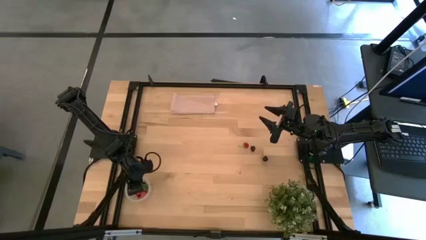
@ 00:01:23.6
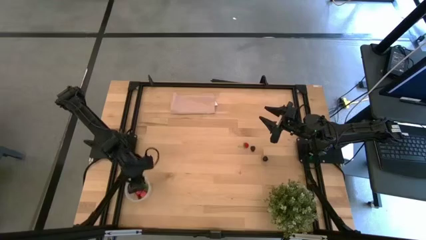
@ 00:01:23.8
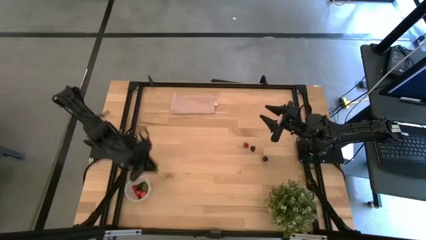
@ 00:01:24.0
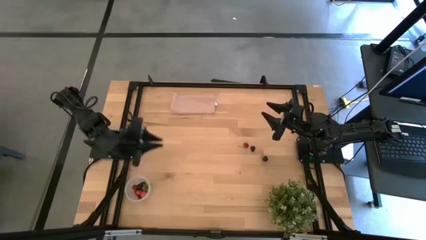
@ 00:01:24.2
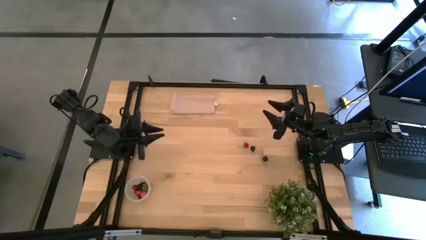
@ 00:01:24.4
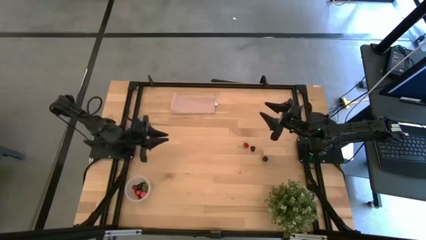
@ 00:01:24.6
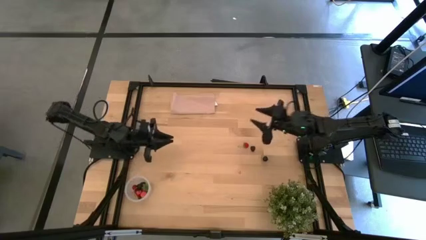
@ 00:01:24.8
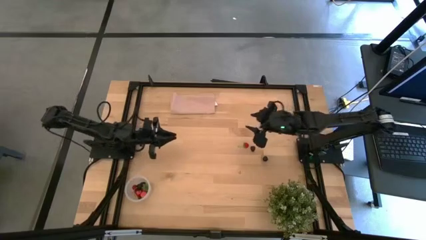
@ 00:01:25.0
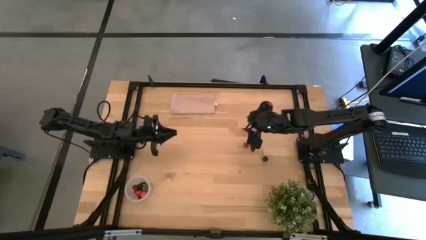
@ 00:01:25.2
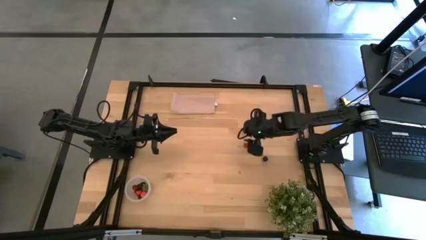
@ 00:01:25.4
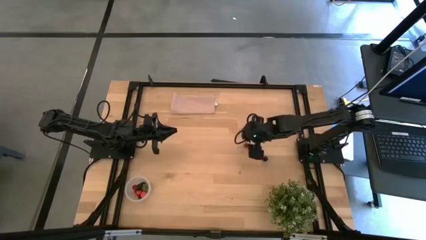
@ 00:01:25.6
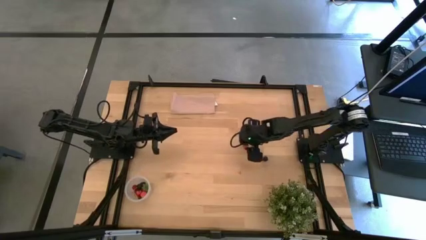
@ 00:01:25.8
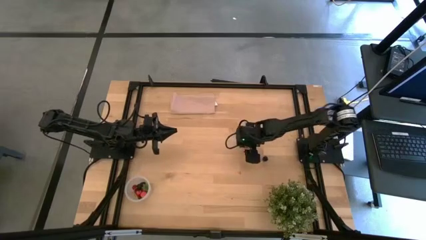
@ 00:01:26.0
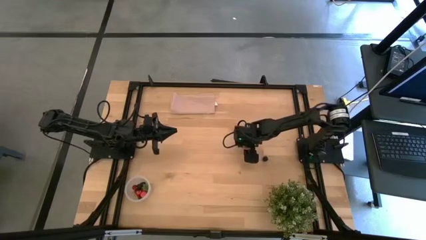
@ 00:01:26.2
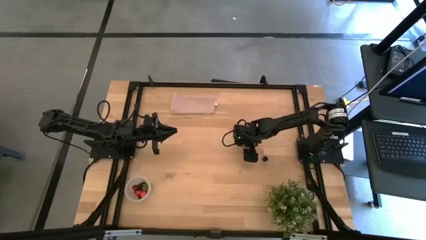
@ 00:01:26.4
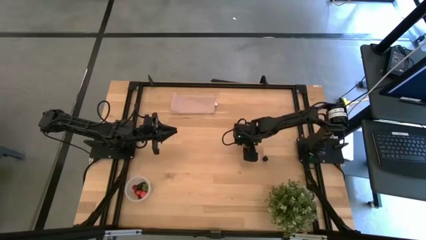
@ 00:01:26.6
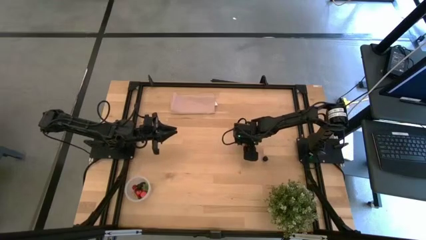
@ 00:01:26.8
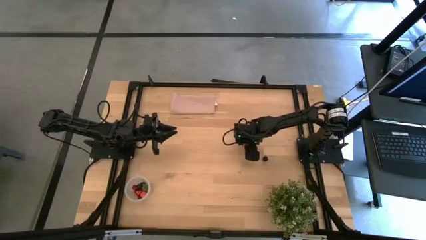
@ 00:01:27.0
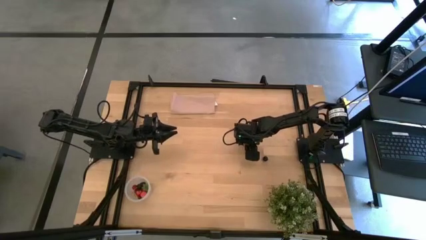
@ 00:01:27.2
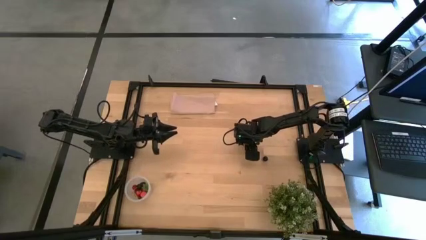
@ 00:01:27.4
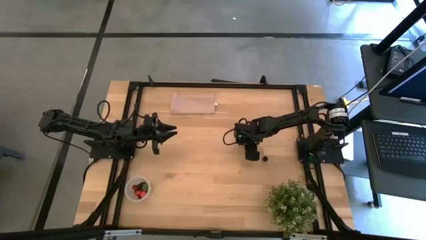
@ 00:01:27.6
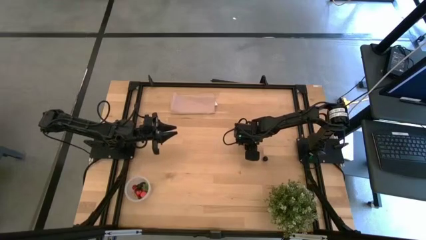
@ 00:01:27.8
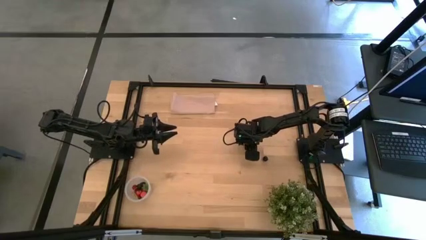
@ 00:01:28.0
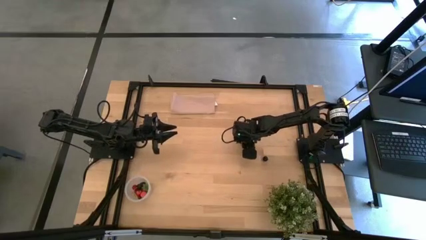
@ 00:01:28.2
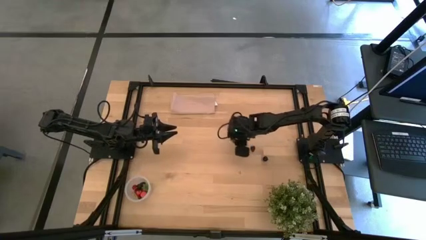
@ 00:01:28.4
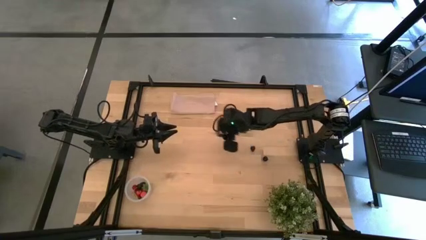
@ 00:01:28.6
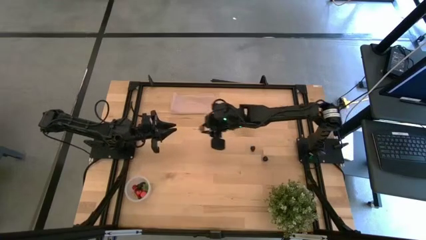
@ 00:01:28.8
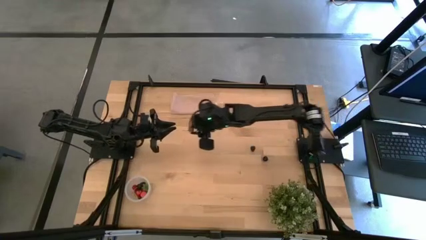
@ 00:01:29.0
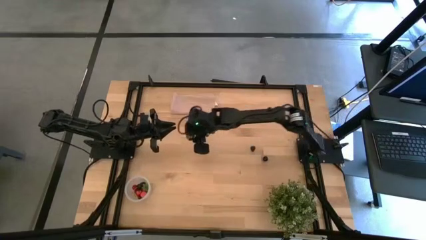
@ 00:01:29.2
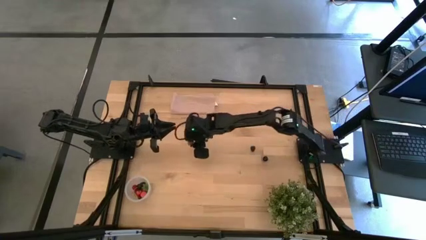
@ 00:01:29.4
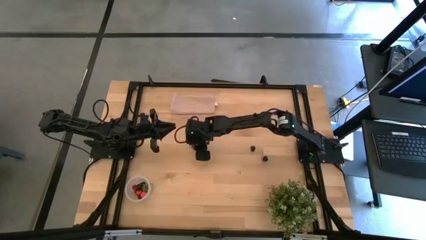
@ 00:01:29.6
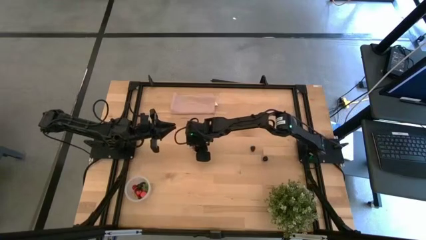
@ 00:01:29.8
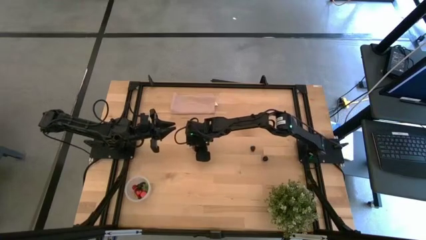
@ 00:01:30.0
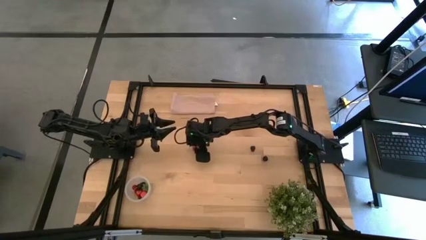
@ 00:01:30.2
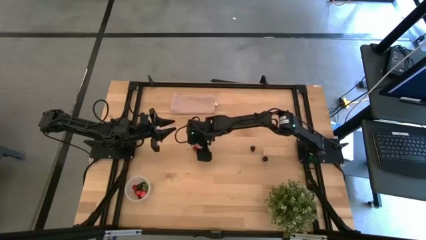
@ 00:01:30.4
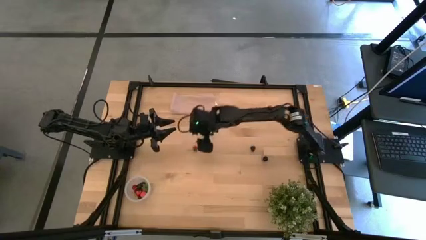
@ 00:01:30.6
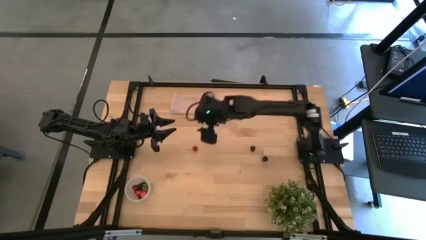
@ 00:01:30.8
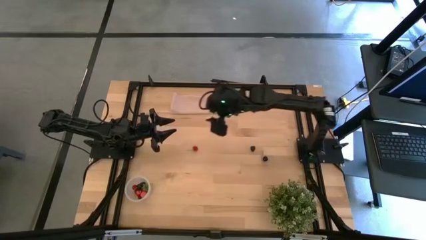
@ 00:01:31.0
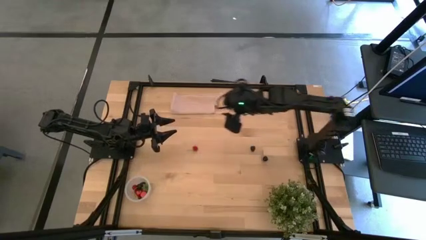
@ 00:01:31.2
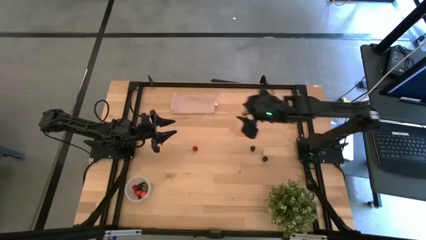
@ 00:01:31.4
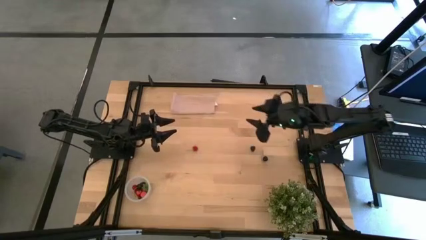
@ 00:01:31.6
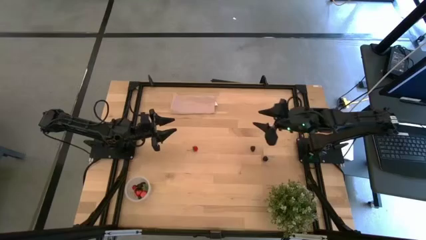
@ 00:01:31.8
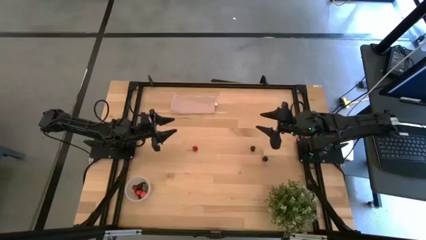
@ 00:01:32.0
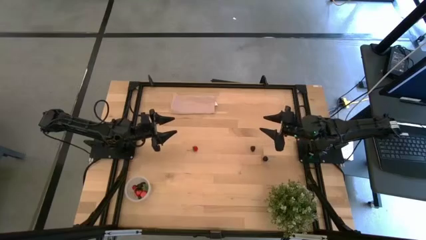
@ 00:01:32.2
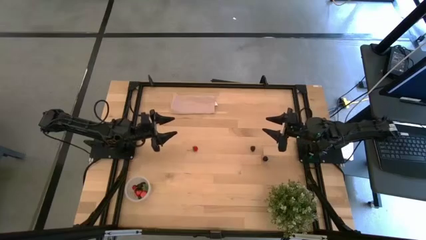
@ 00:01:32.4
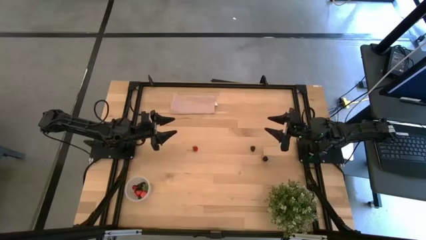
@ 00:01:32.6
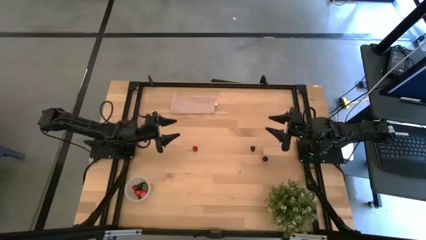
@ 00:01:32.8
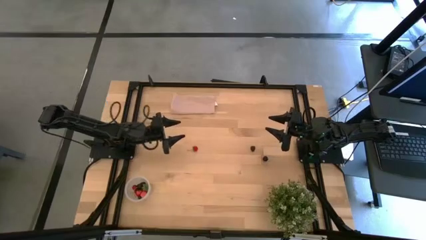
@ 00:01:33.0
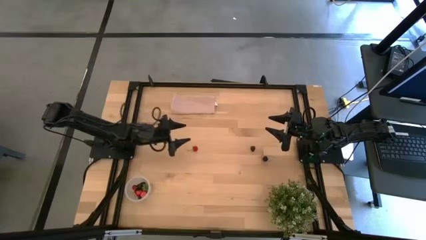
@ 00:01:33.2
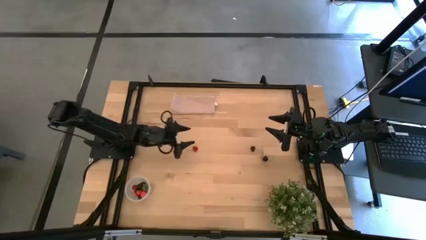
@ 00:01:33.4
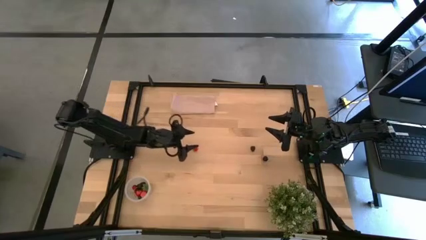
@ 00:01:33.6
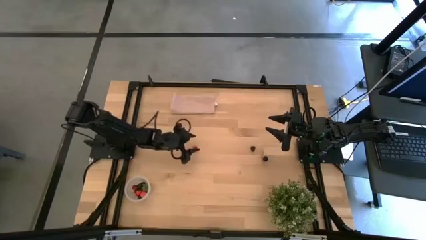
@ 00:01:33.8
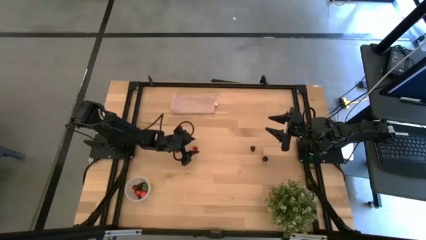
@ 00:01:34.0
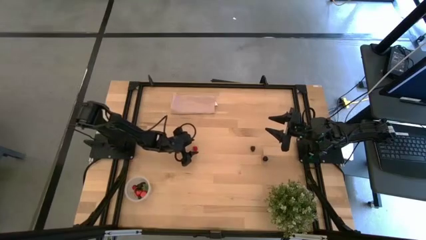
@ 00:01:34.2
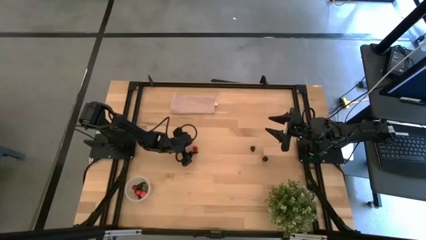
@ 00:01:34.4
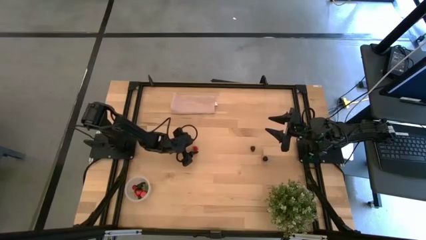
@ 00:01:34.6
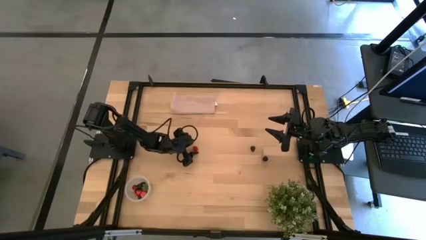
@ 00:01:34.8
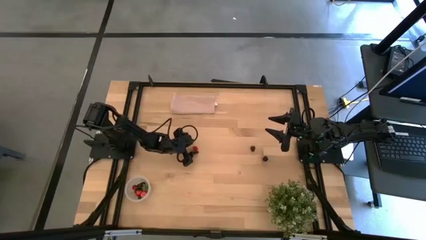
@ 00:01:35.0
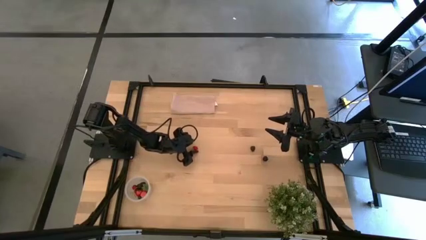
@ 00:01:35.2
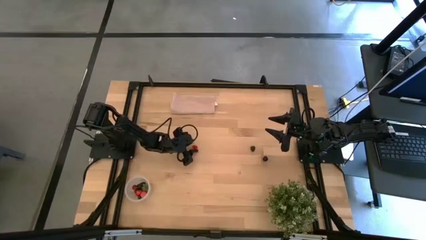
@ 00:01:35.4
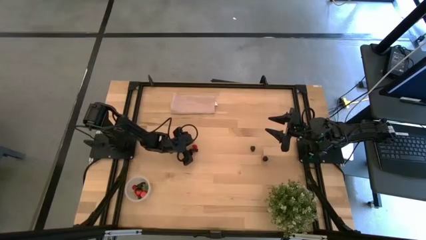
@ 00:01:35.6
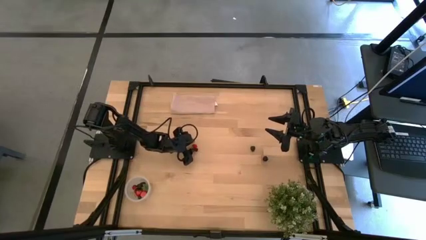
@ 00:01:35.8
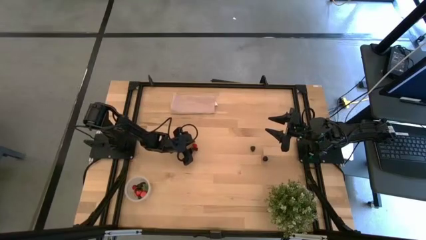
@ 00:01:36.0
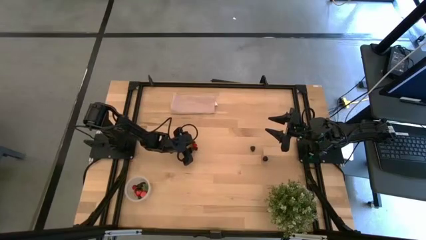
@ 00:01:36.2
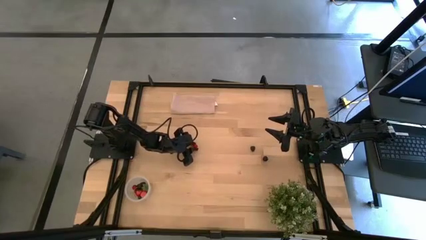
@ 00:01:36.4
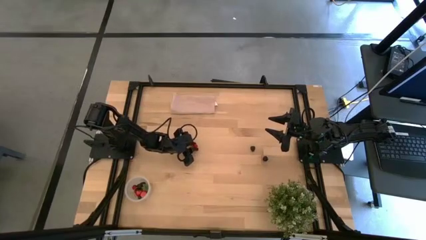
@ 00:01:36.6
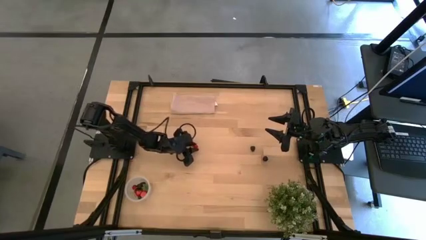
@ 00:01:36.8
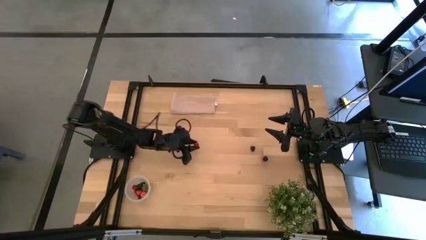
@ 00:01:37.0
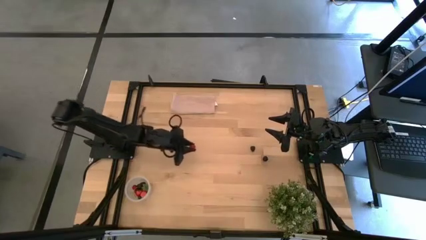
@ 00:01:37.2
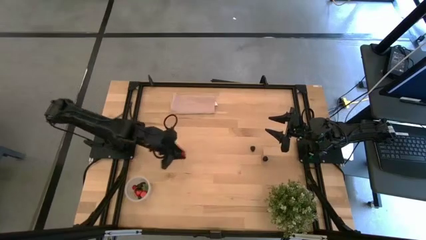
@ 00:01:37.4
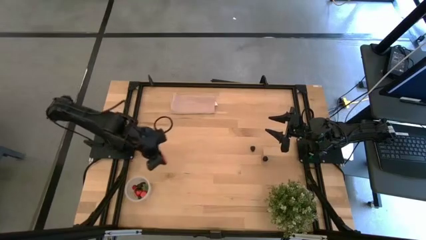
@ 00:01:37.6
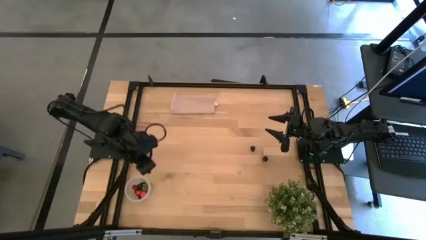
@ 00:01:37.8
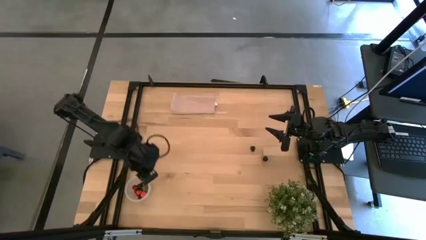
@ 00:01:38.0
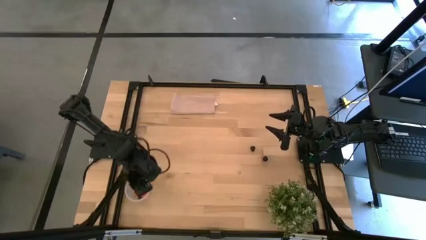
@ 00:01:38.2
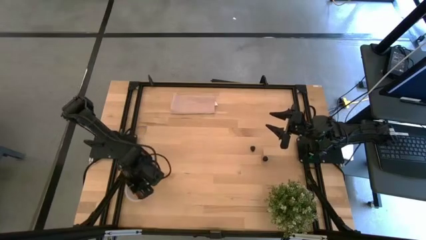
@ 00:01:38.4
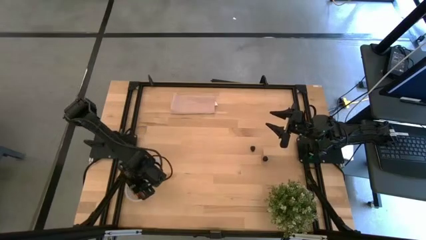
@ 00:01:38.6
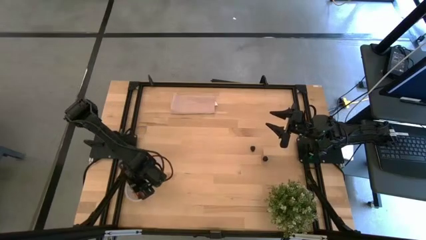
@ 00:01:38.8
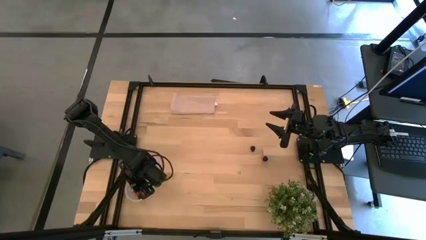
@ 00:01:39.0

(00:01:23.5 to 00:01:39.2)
Task: Pick and placing Produce into tupperware
Put the strawberry into the transparent bin
